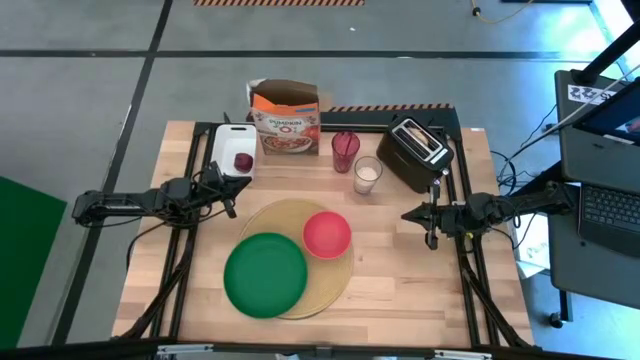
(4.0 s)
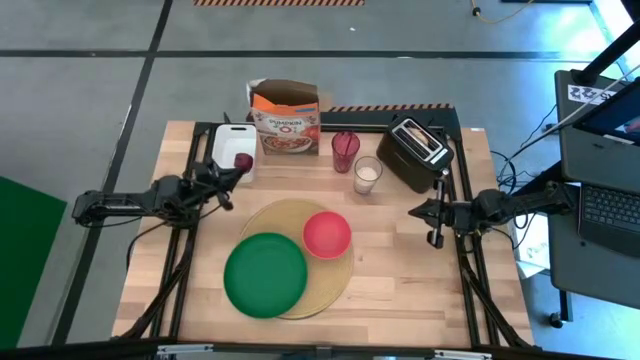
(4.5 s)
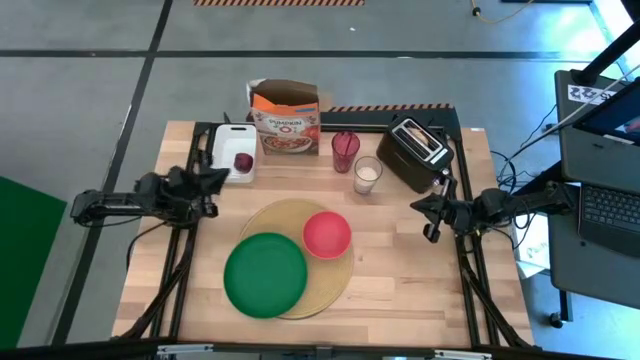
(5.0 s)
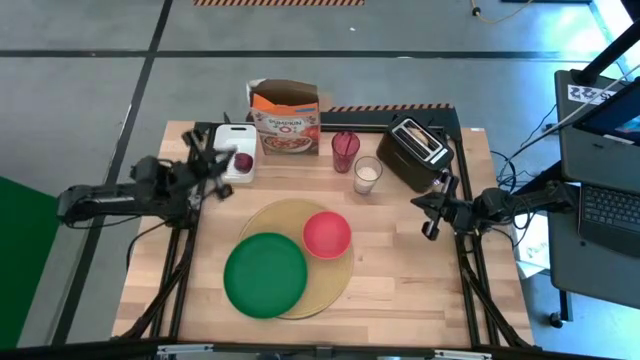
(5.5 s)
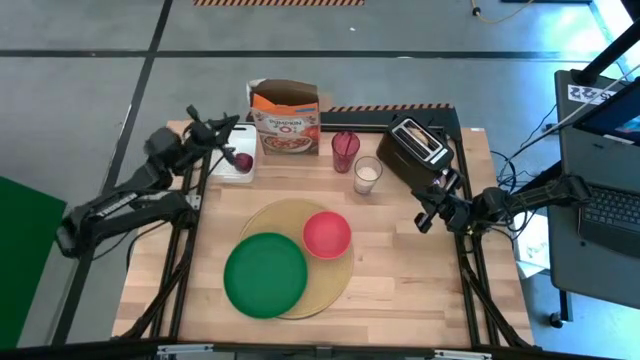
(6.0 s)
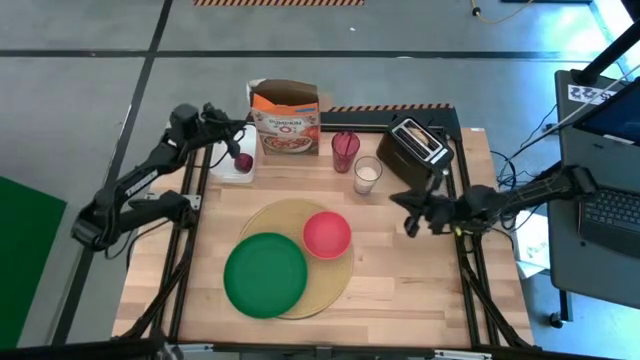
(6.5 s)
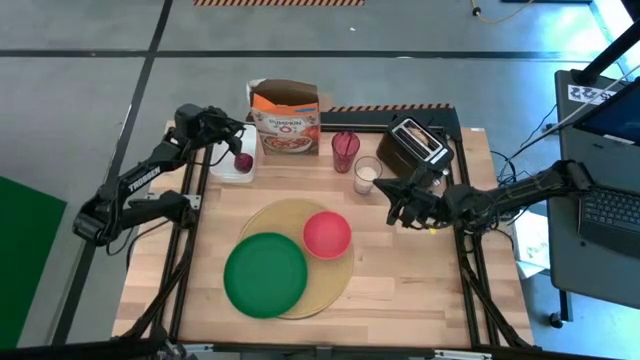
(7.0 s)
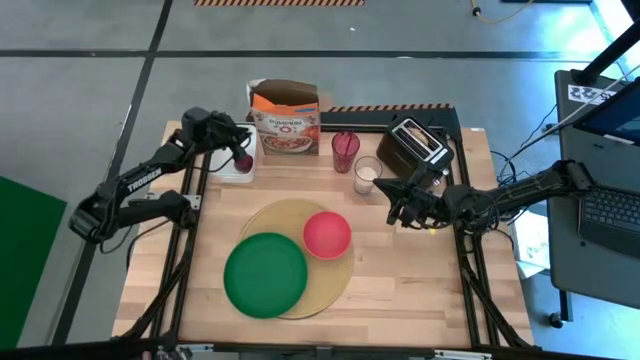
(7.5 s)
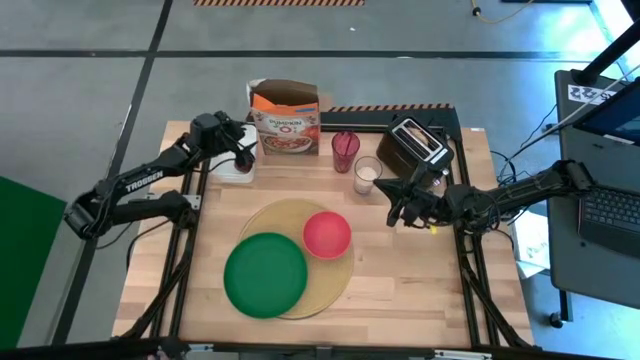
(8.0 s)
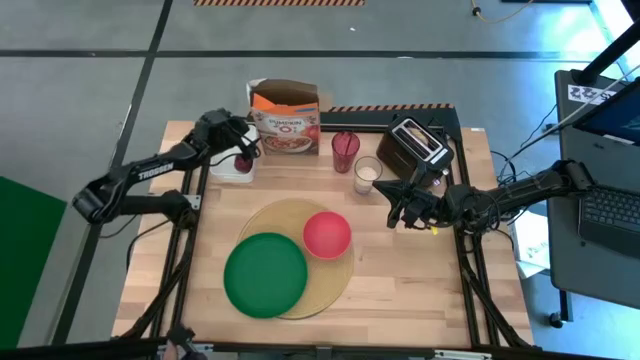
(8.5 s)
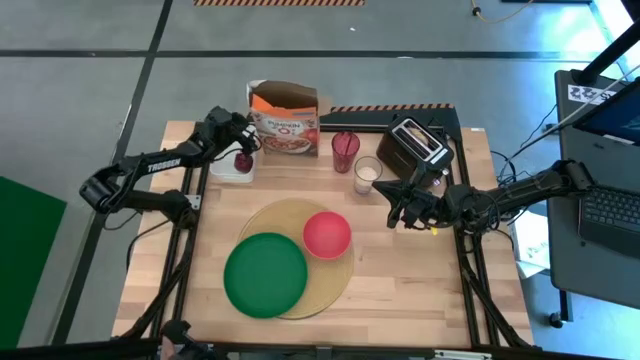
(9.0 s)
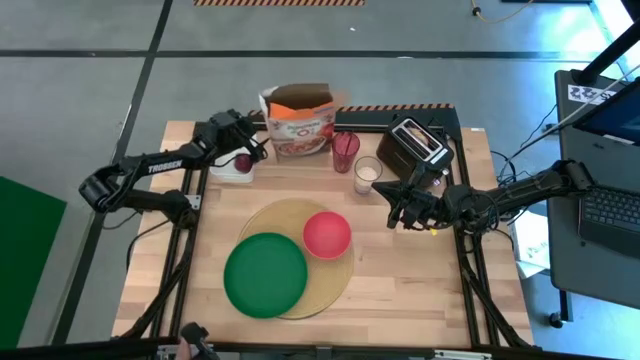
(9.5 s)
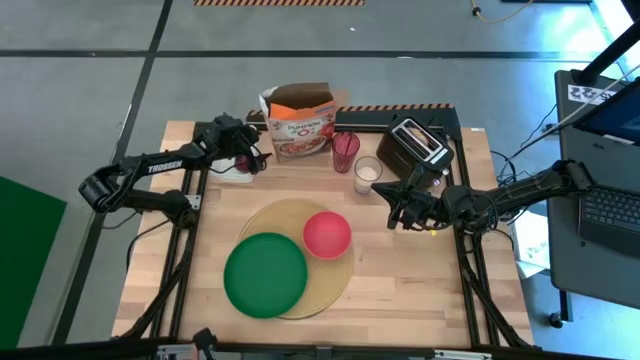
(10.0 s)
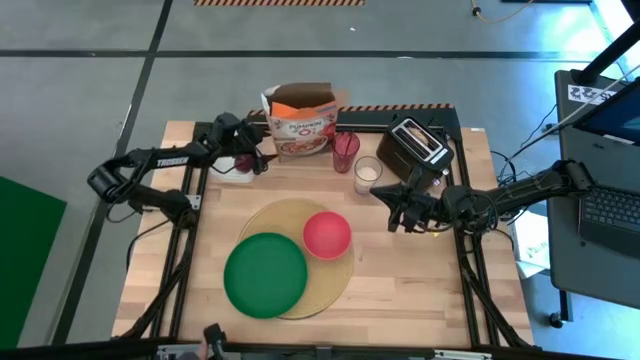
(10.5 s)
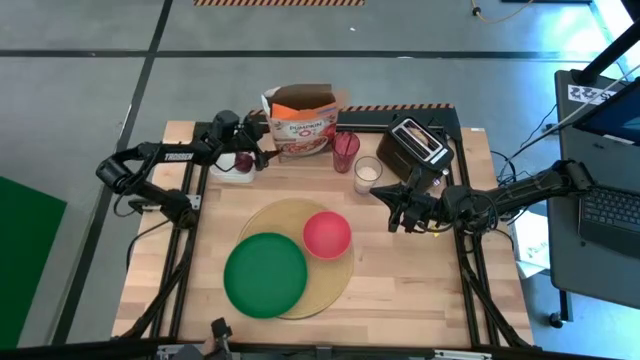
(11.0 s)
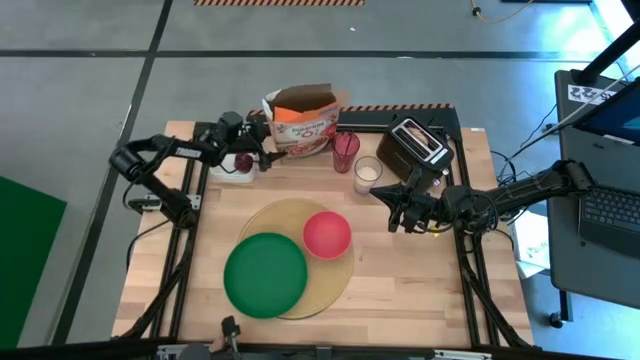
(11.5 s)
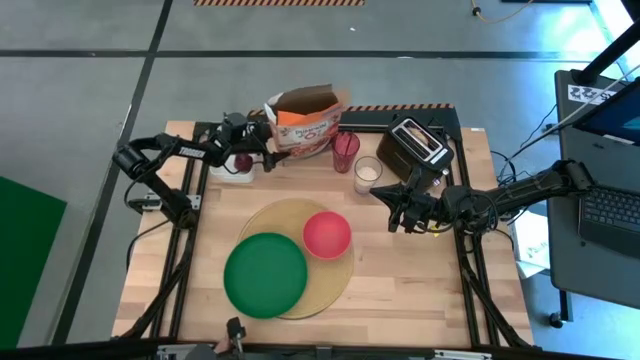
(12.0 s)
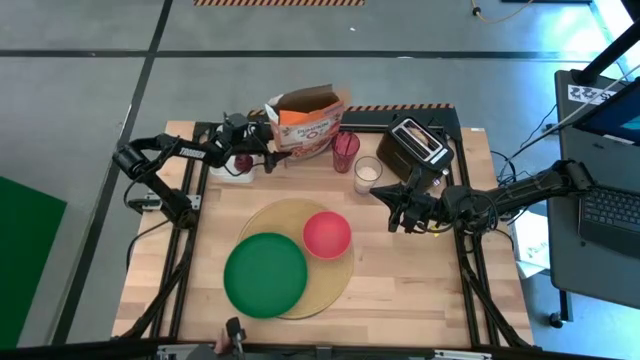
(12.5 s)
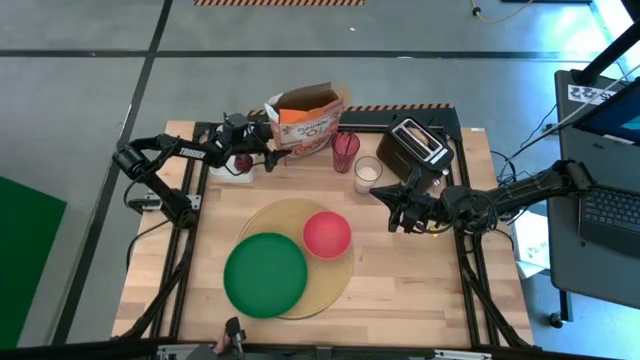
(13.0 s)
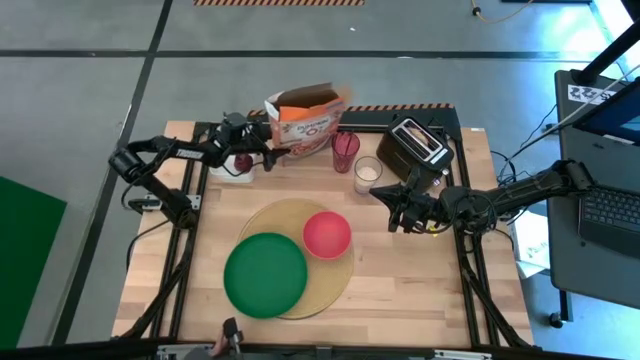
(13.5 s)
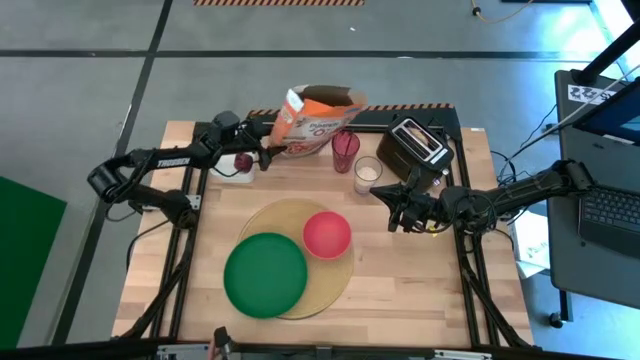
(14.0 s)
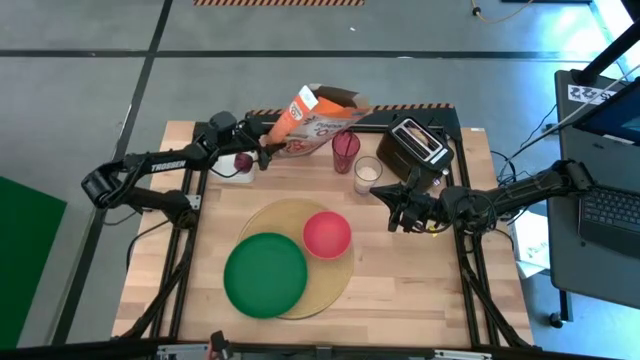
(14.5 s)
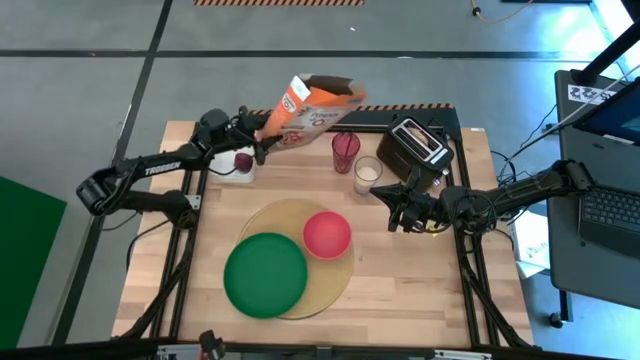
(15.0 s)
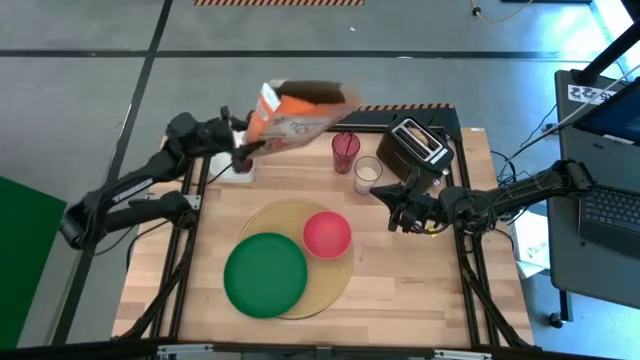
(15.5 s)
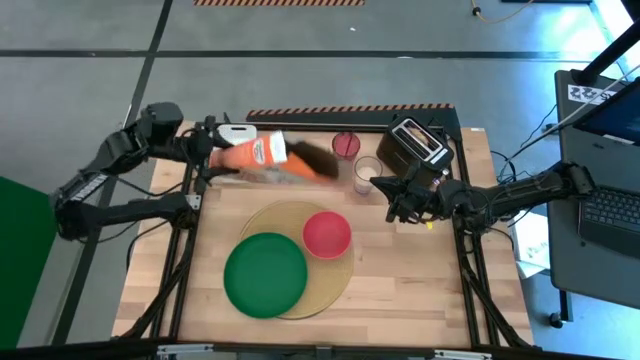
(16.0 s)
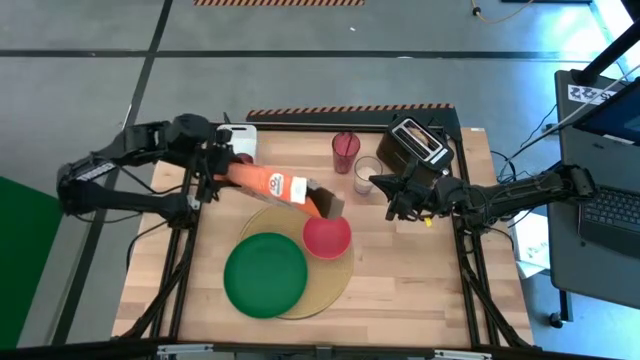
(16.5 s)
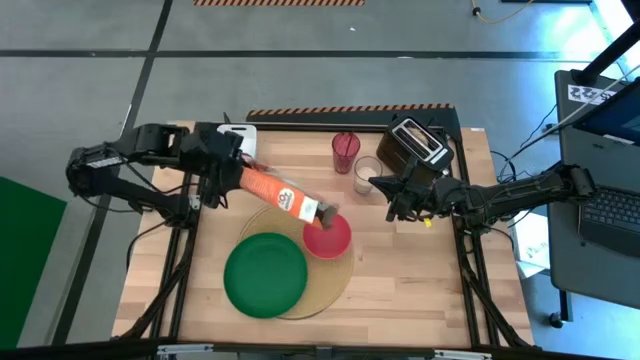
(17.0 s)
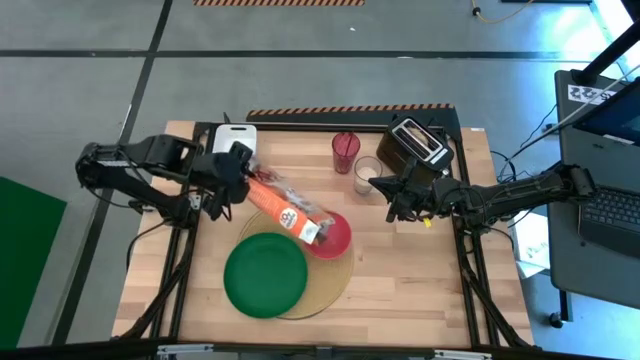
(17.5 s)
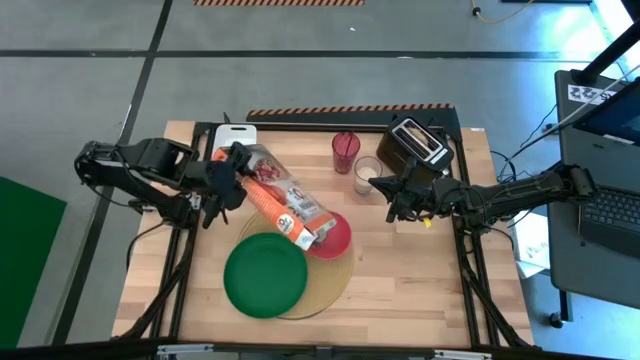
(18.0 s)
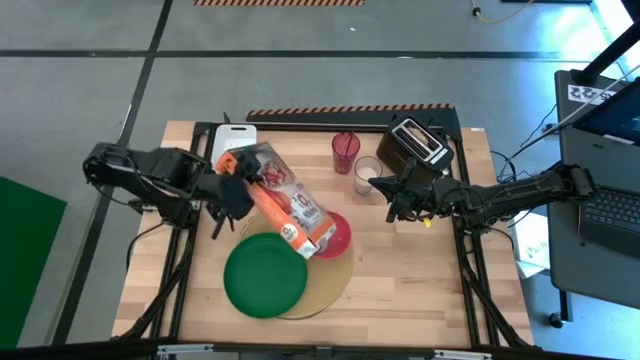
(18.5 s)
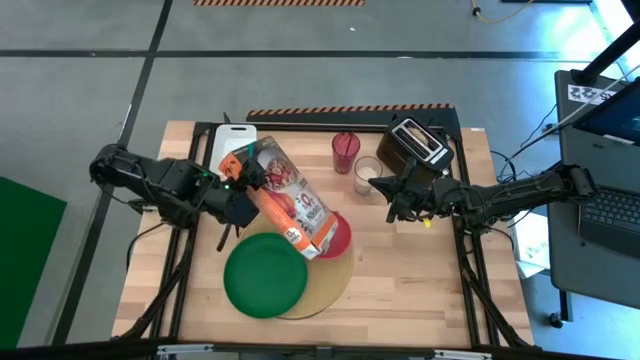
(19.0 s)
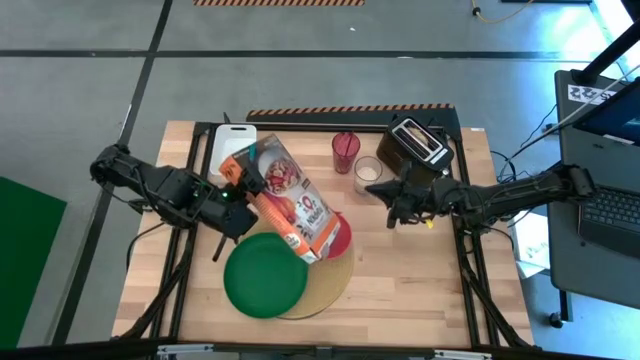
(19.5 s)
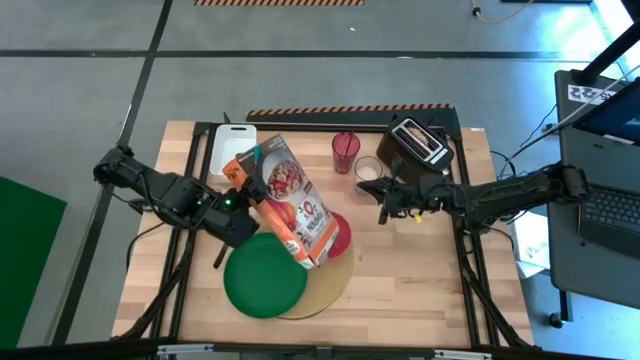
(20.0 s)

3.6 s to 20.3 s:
Task: Arrange a breakfast setting
Pour the cereal from the box into the orange bowl

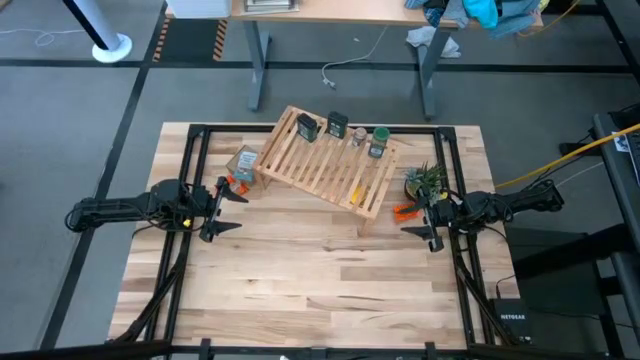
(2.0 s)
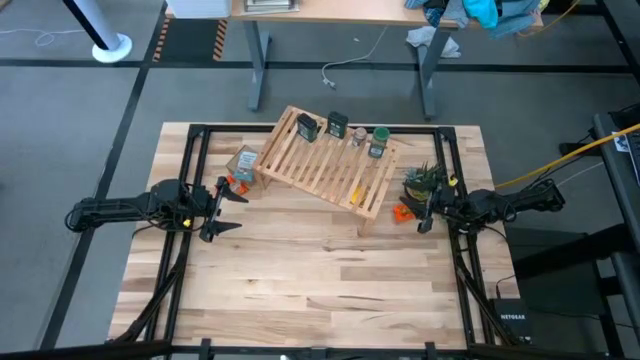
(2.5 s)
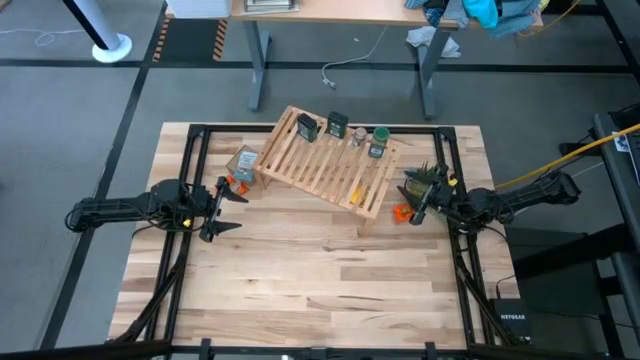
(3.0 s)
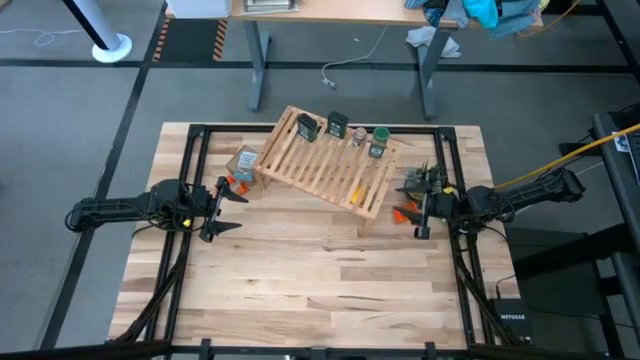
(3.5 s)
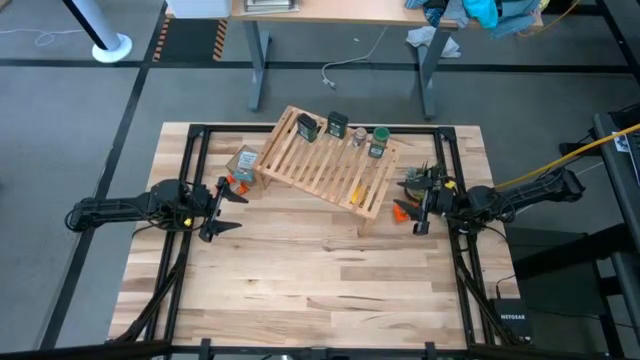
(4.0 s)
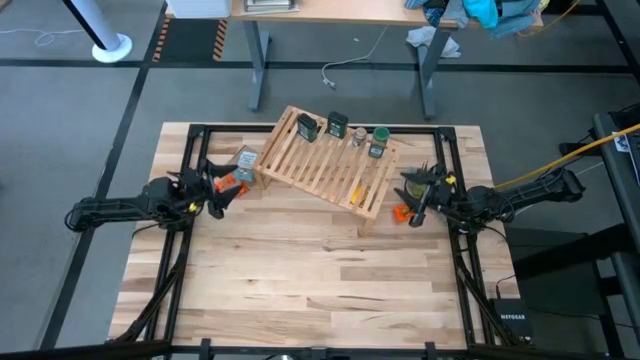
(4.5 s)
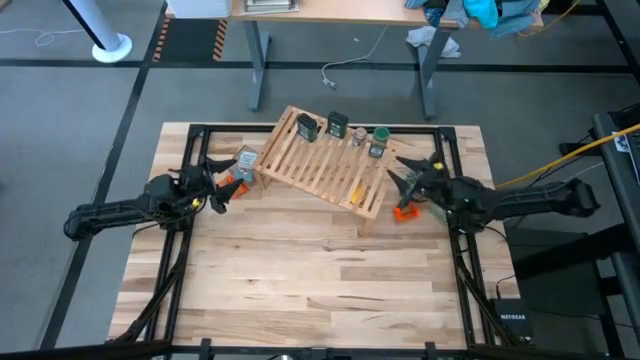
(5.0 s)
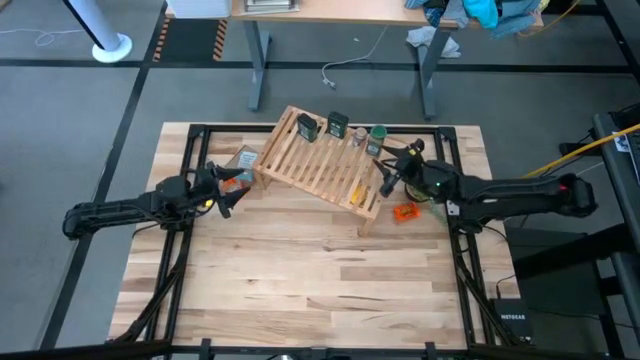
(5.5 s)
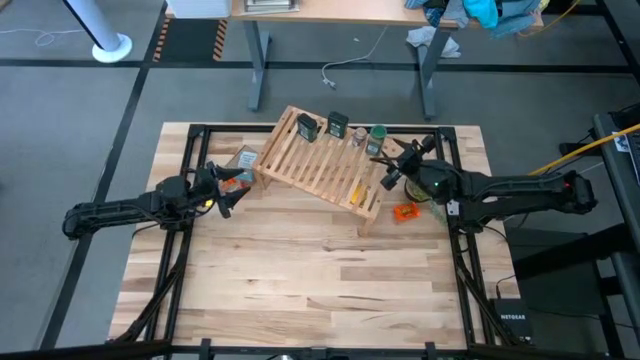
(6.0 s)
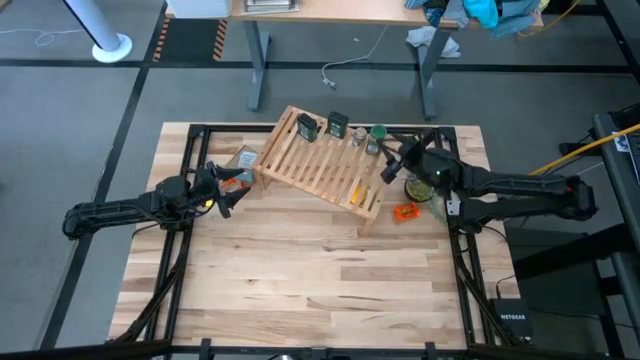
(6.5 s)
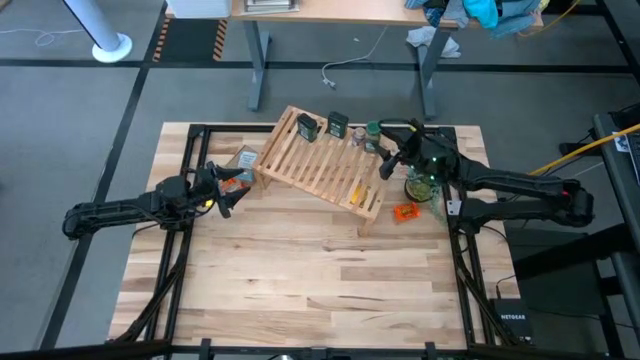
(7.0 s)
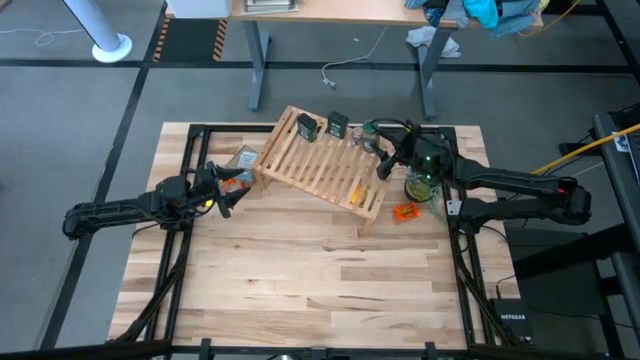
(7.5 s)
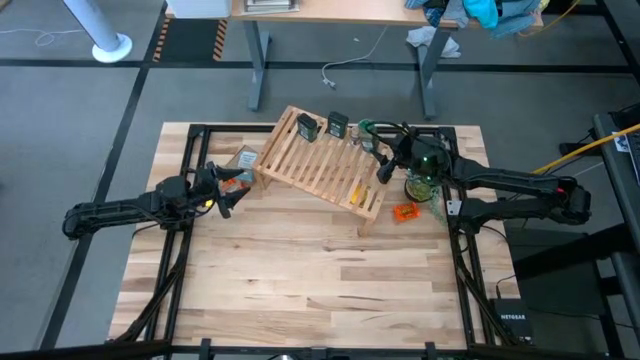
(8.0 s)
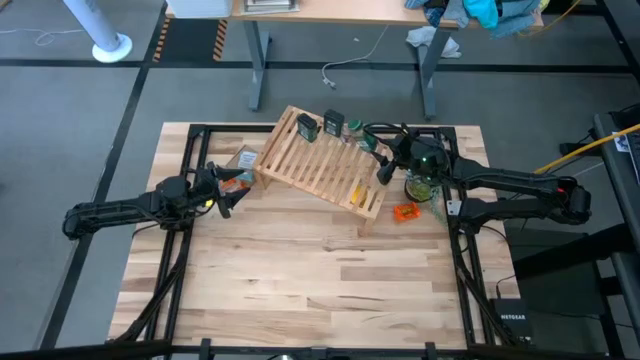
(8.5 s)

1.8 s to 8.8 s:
Task: Shelf spices
Remove the green seasoning bottle from the shelf
